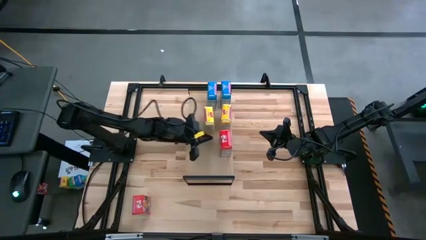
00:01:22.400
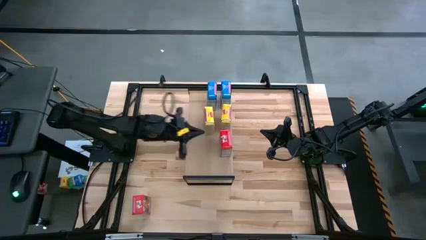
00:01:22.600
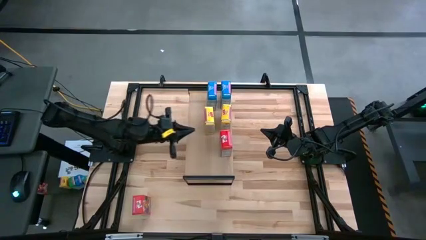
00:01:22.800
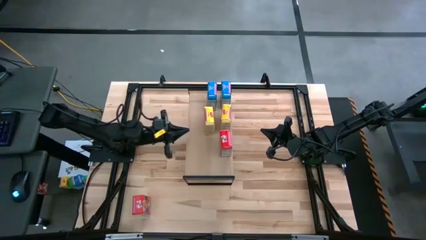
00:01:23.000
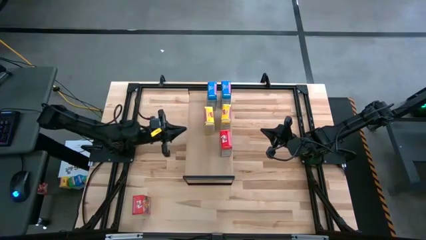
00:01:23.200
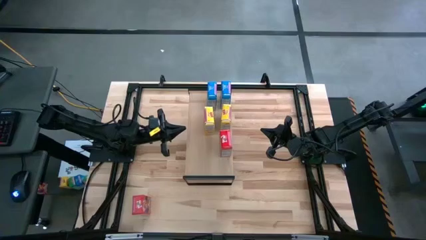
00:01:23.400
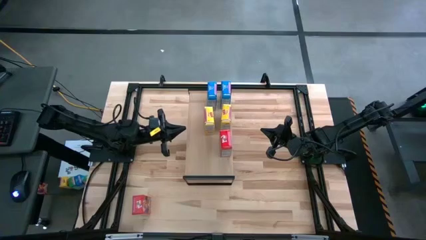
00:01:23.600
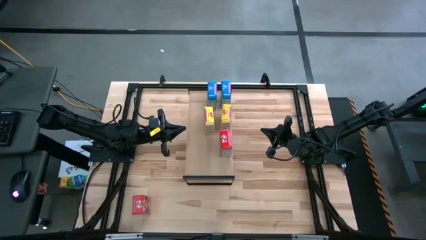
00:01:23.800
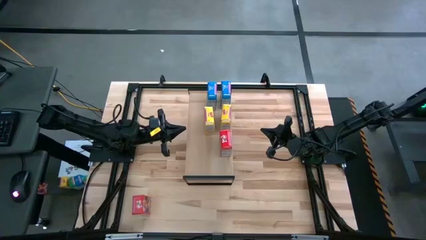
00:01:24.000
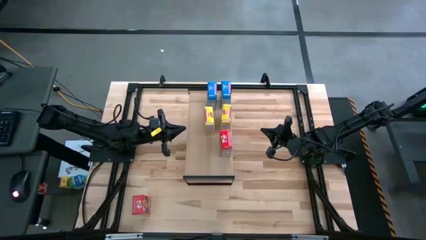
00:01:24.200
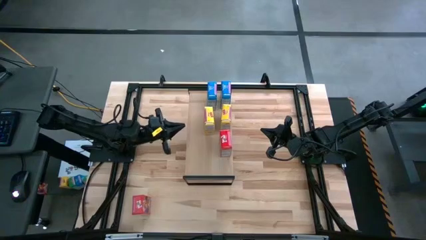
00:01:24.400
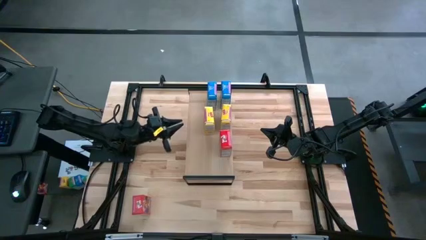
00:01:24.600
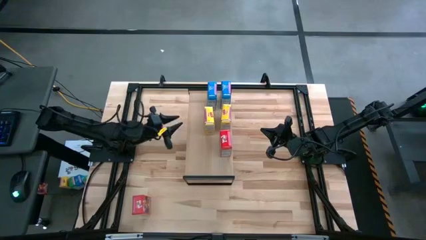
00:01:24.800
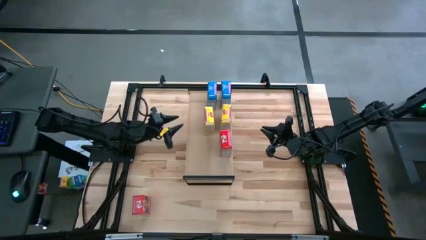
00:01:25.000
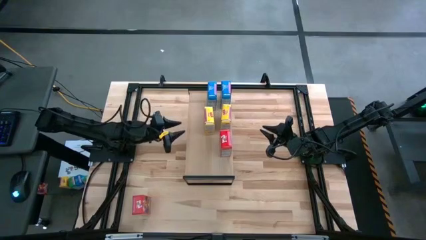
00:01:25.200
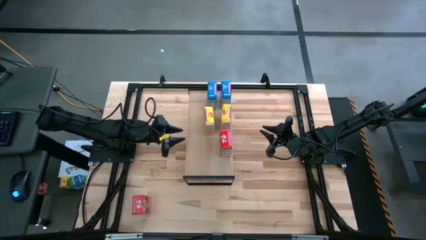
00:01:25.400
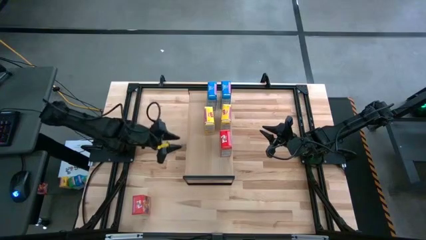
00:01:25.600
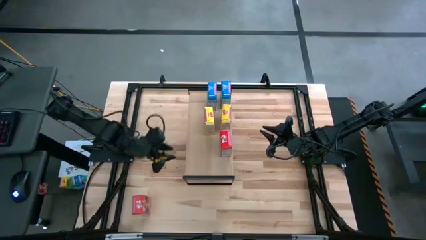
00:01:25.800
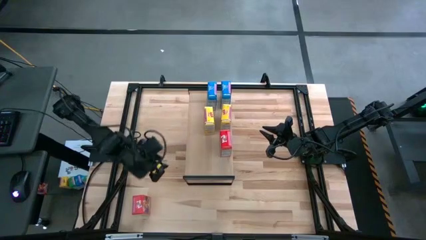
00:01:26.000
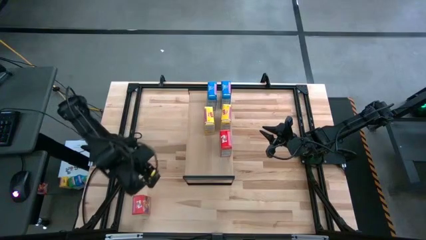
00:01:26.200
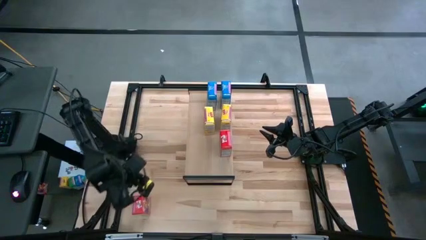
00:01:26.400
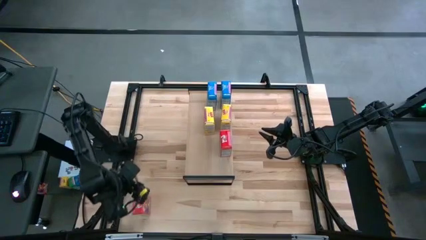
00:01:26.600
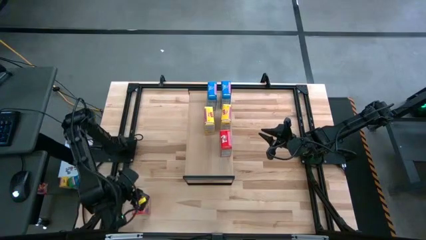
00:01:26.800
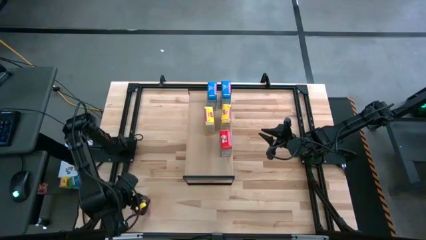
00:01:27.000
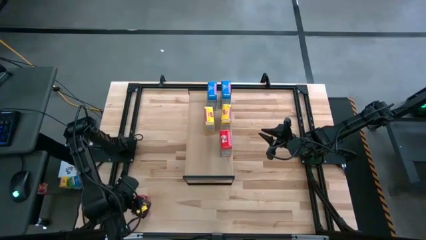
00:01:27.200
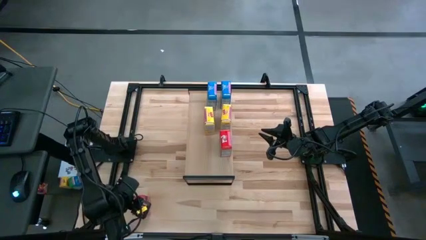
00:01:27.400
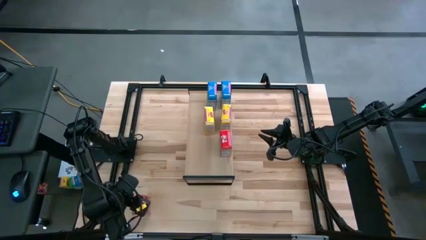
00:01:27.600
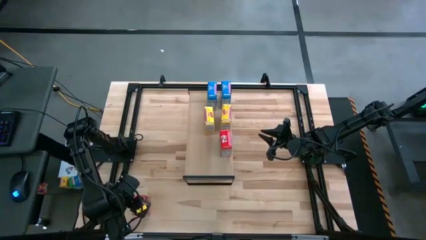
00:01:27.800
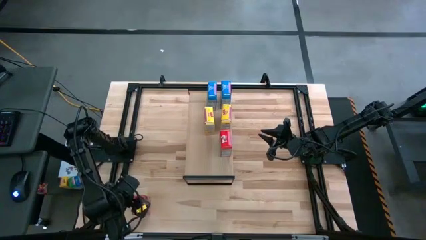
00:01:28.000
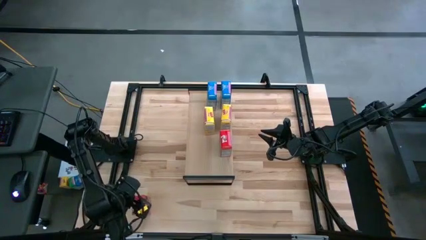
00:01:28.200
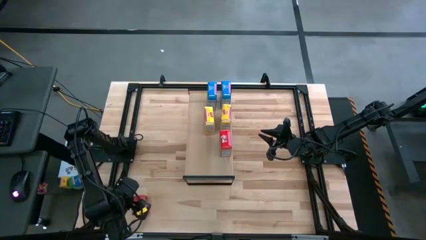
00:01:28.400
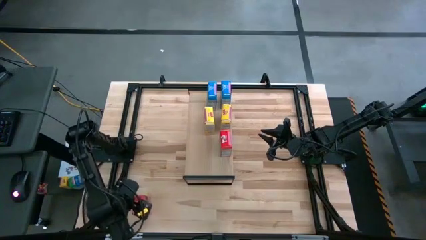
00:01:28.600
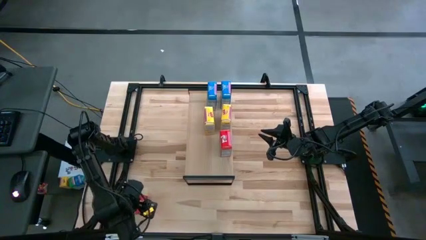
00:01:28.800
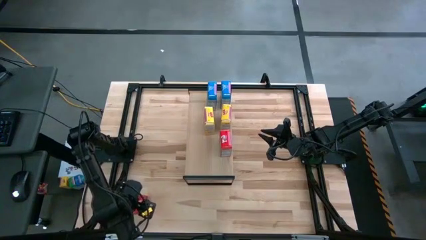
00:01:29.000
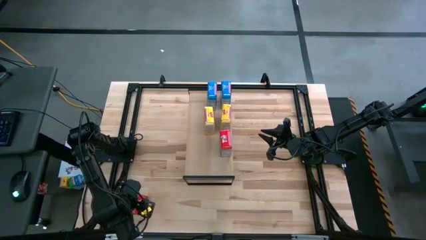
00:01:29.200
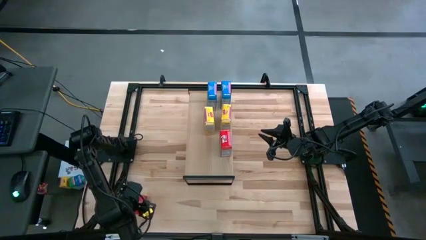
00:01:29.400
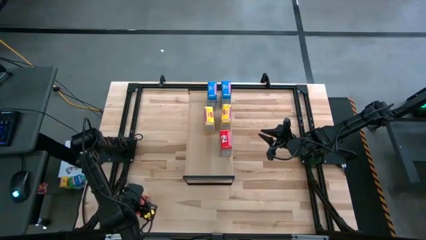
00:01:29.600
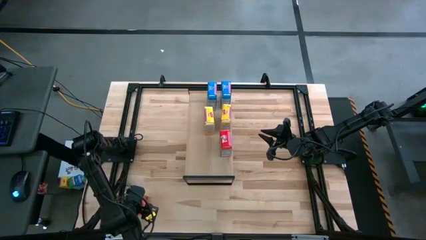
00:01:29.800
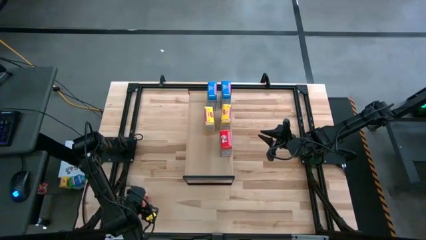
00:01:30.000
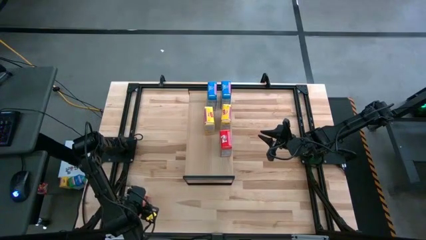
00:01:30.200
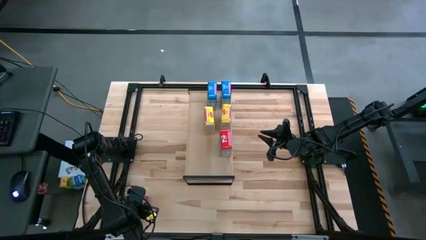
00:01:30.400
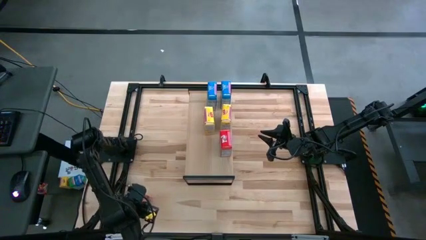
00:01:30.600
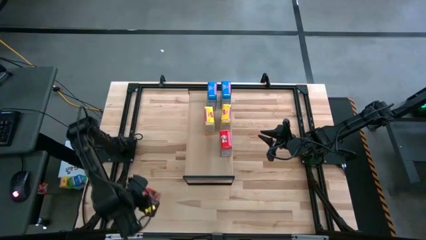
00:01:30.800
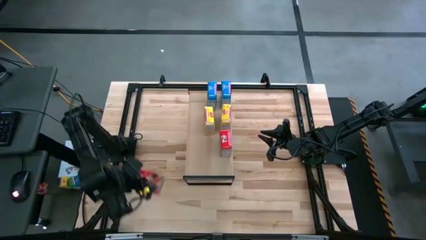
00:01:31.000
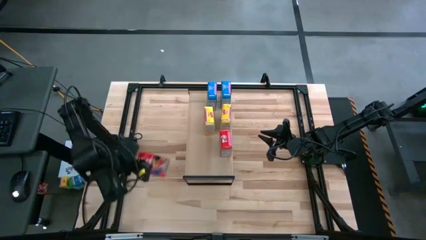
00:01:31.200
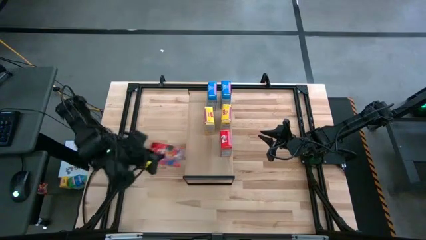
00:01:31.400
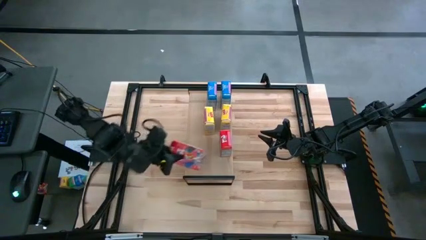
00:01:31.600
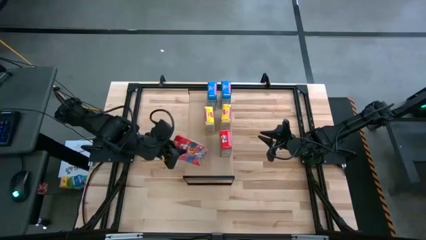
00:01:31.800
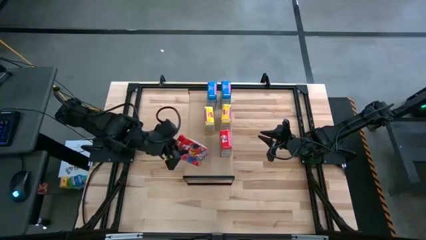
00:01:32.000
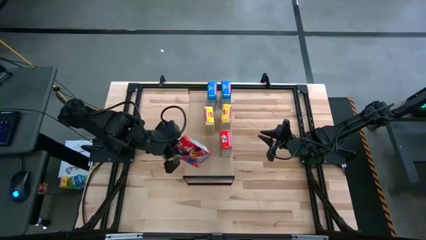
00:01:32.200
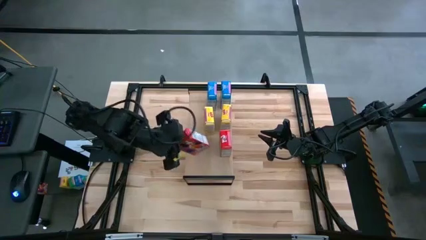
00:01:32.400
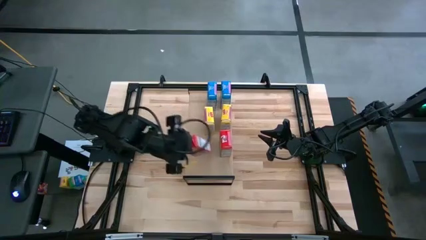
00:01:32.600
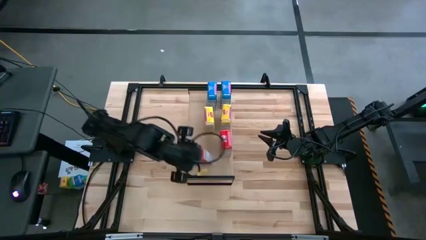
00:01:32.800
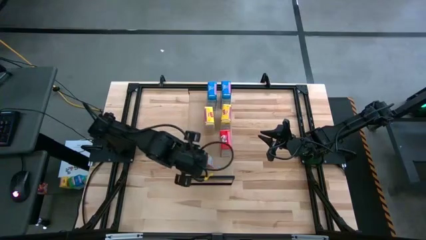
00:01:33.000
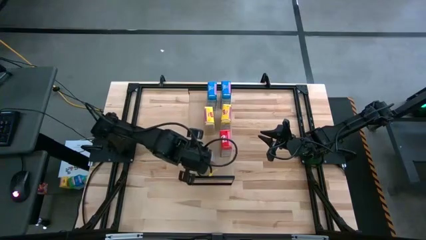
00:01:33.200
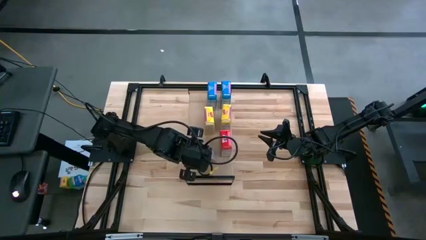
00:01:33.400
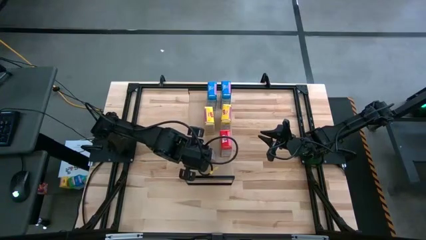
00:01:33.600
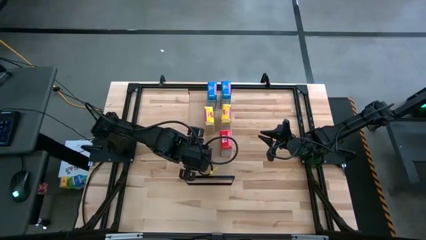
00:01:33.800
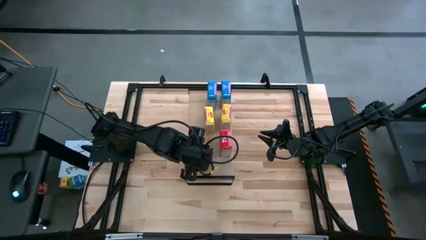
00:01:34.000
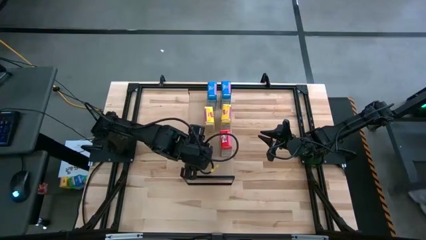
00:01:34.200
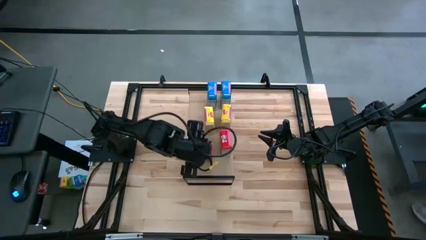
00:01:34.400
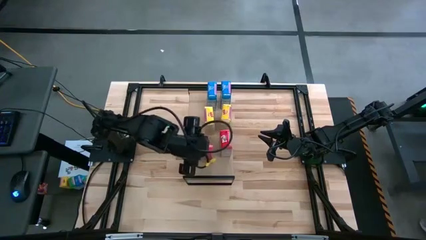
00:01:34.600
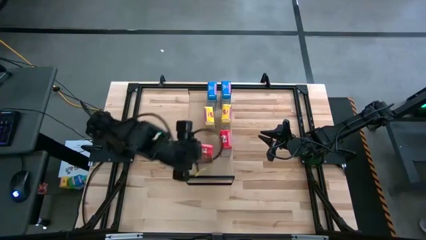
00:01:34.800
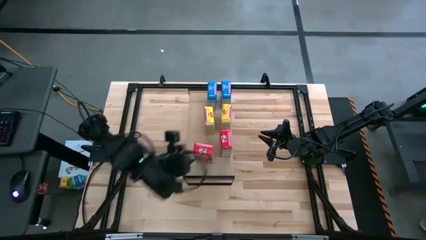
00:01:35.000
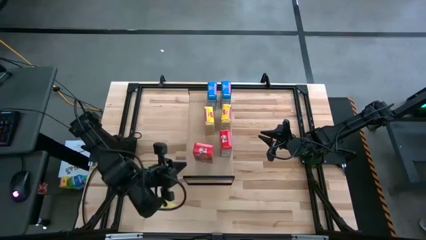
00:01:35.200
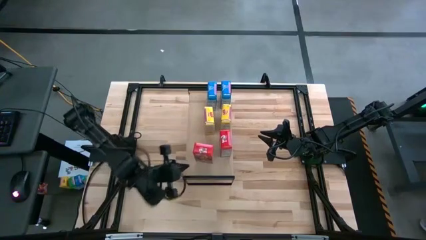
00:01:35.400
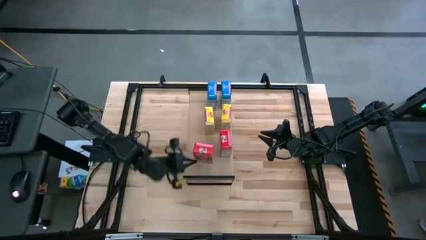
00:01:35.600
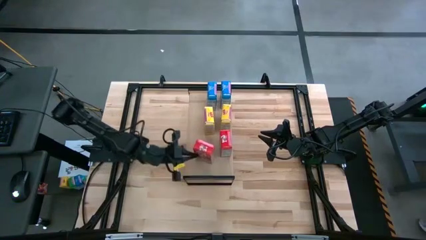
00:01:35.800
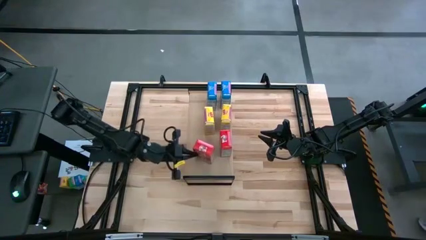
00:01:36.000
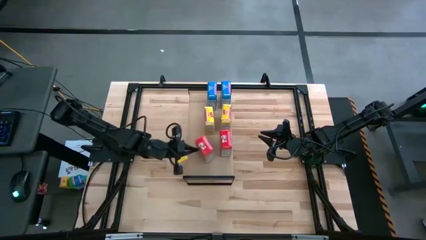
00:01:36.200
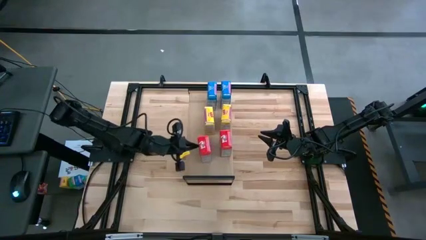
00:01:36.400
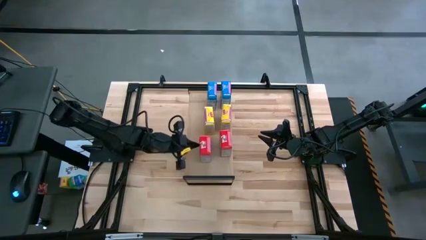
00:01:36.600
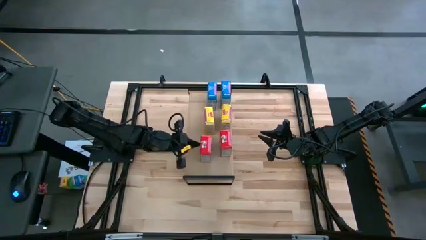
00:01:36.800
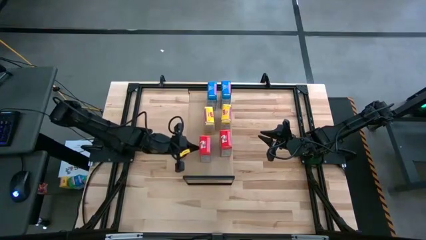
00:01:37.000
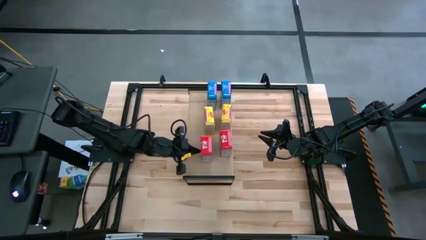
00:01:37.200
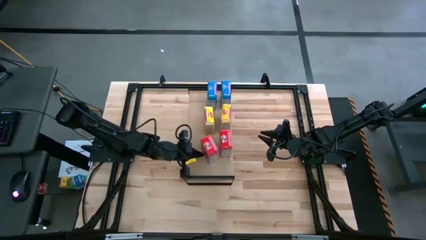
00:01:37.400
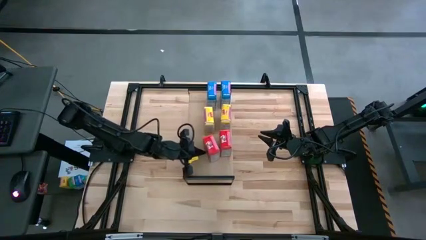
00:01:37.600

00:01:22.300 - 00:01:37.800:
Task: Stack cereal on shelf
Put the red cereal box on the shelf

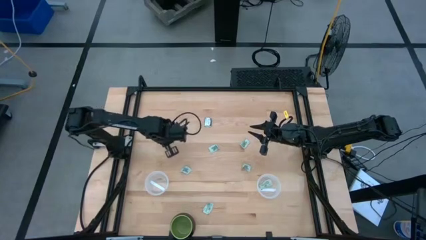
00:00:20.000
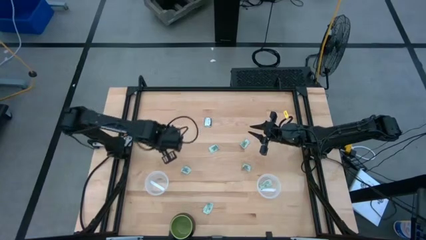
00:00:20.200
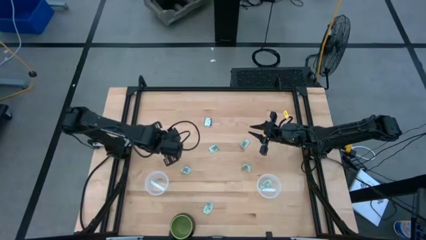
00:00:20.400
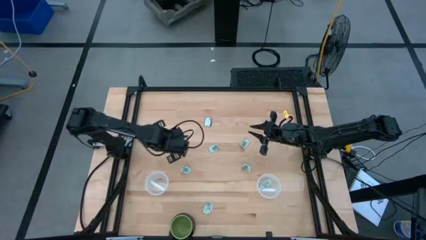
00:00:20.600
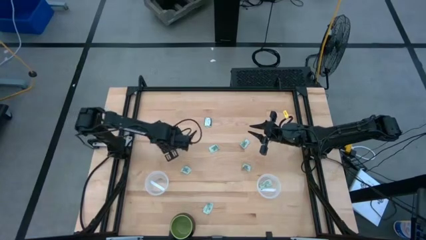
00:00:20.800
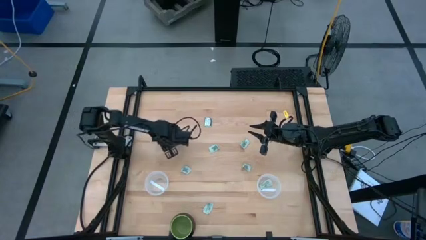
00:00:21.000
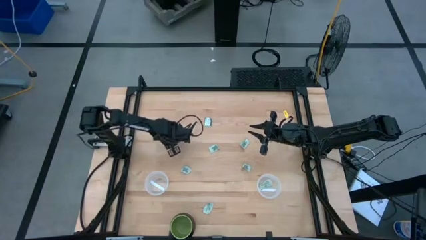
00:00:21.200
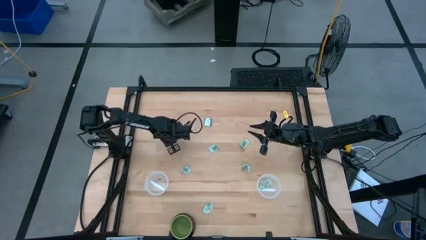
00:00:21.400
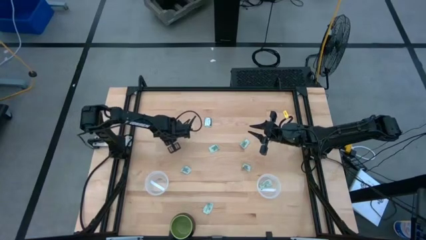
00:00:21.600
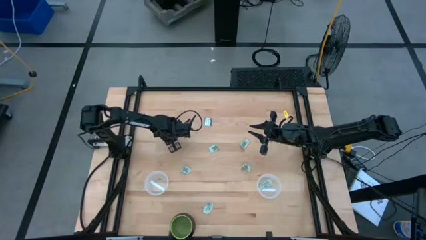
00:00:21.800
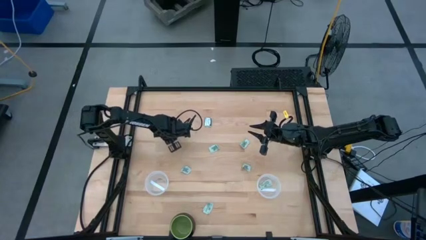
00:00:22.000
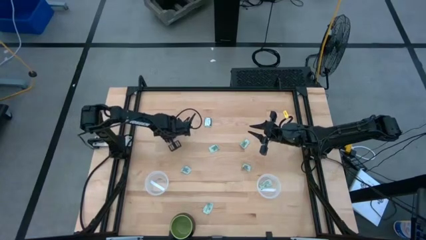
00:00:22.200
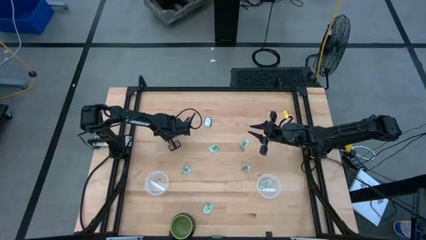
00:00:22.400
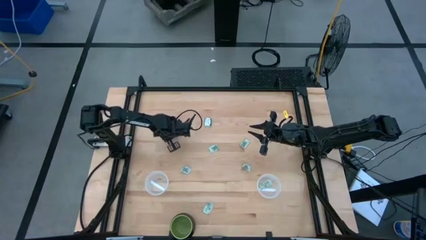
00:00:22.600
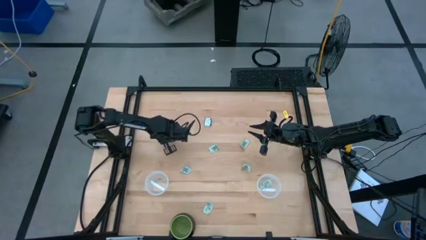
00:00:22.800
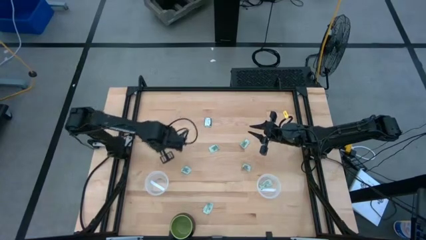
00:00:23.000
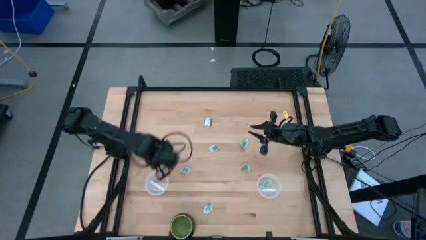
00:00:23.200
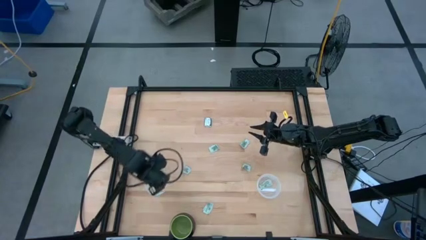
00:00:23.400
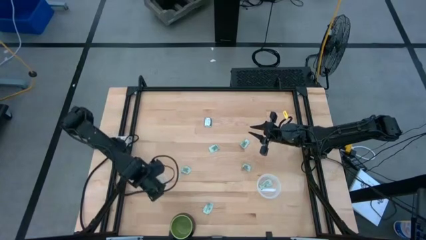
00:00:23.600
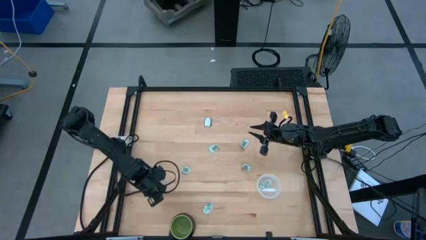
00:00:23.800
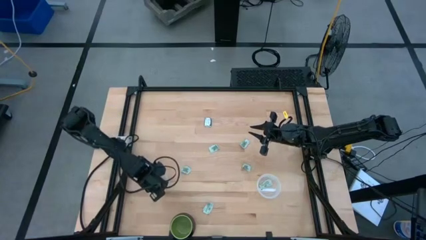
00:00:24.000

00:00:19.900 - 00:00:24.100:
Task: Pick and place Stevia / Truvia into bins
Put the white stevia packet into the left transparent container
